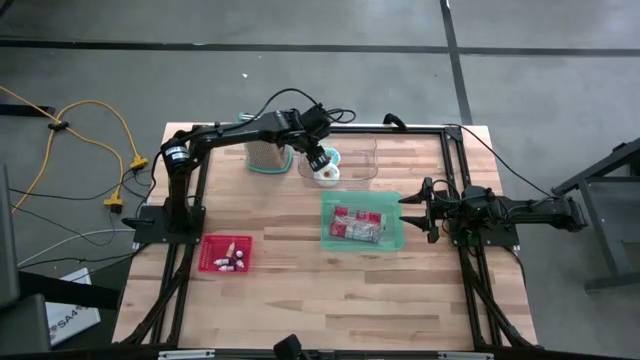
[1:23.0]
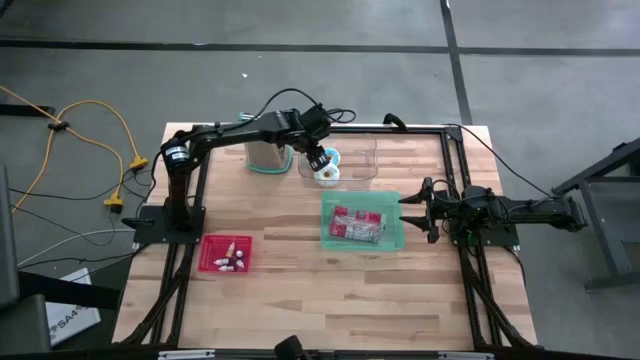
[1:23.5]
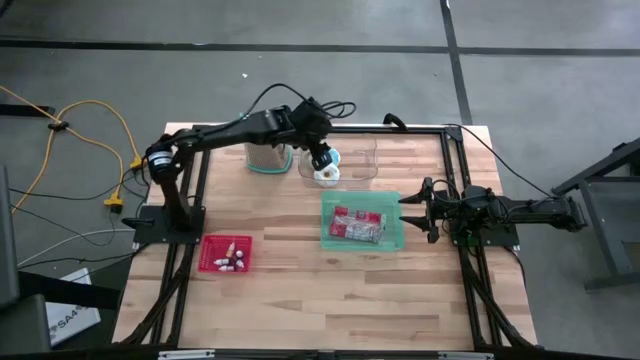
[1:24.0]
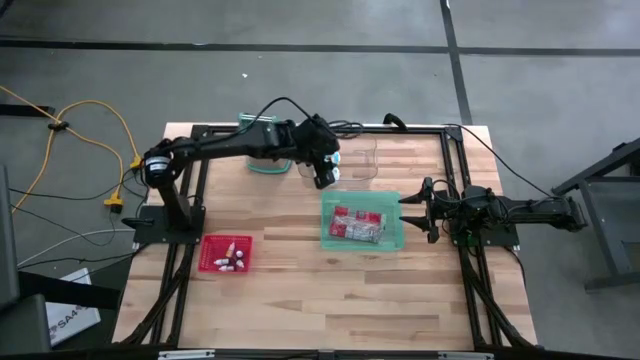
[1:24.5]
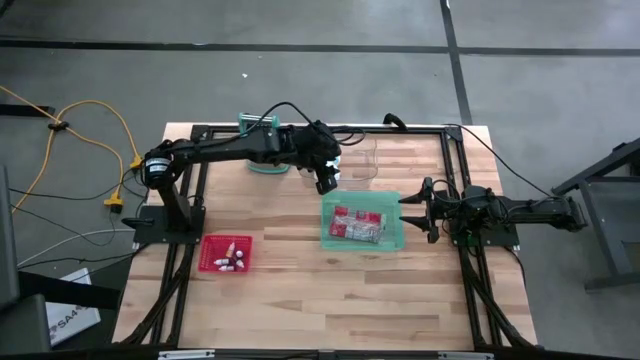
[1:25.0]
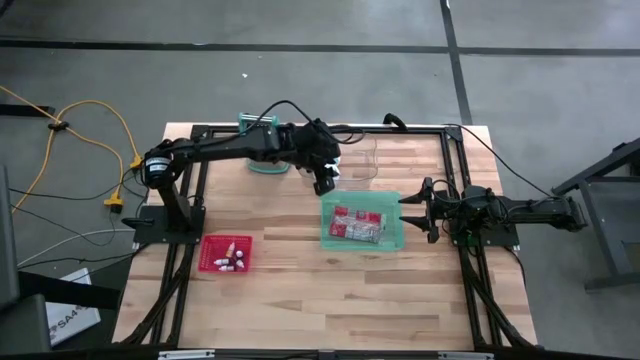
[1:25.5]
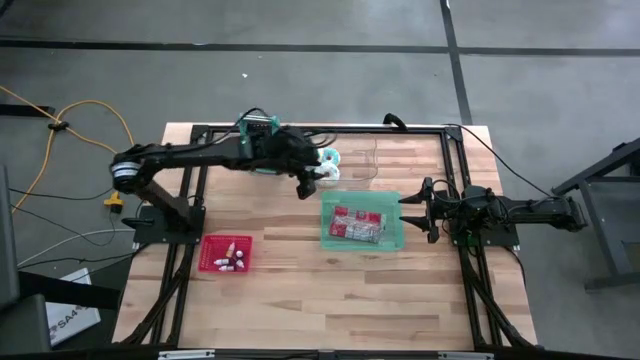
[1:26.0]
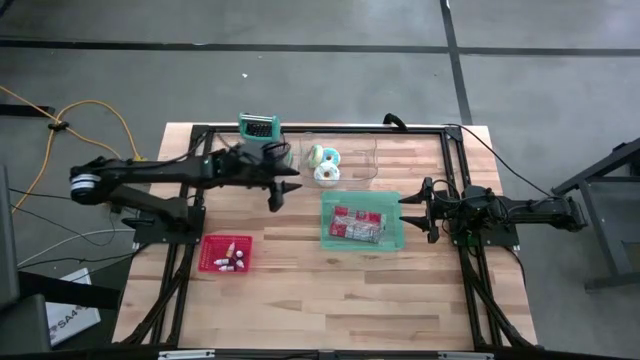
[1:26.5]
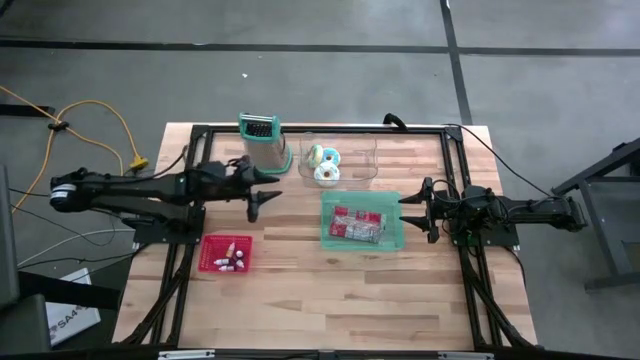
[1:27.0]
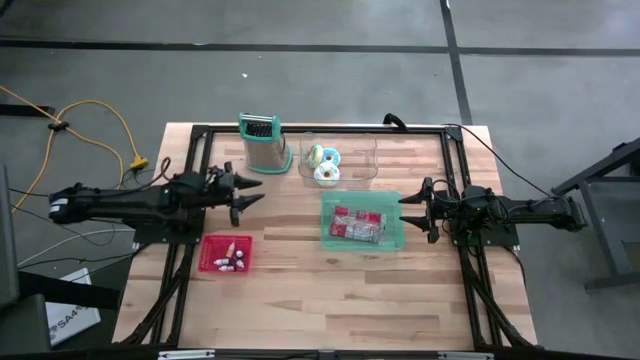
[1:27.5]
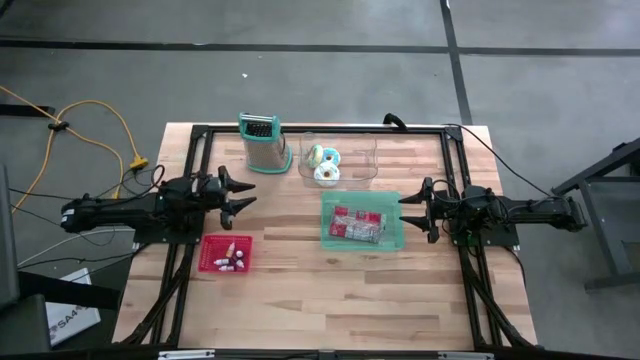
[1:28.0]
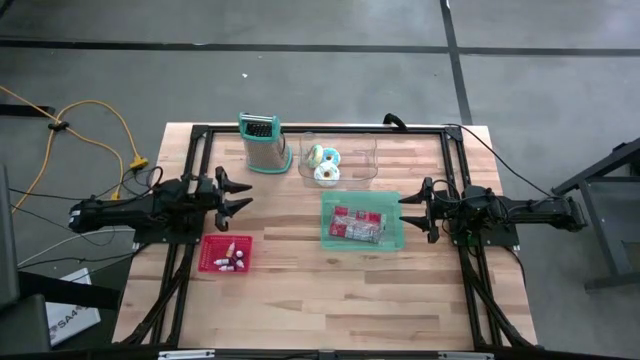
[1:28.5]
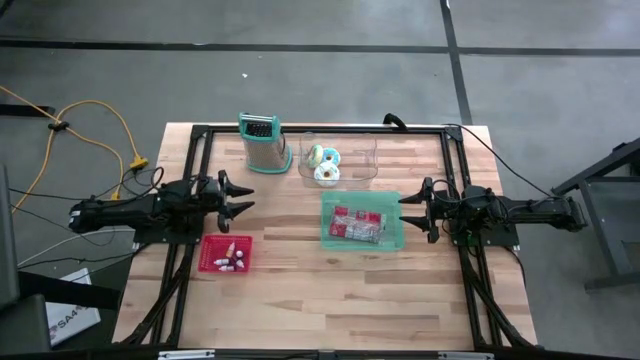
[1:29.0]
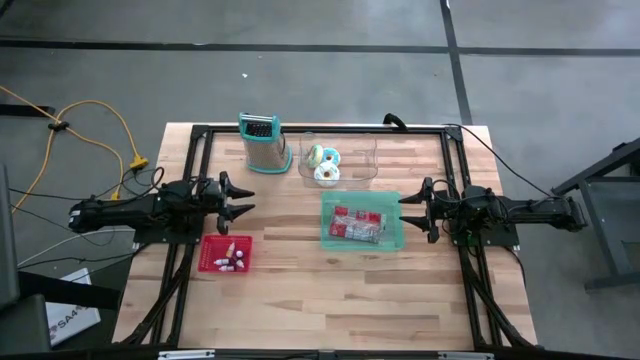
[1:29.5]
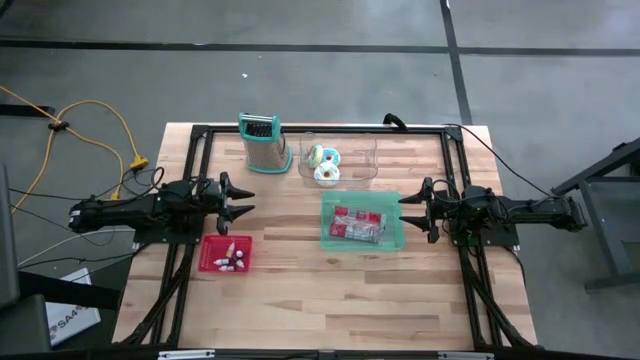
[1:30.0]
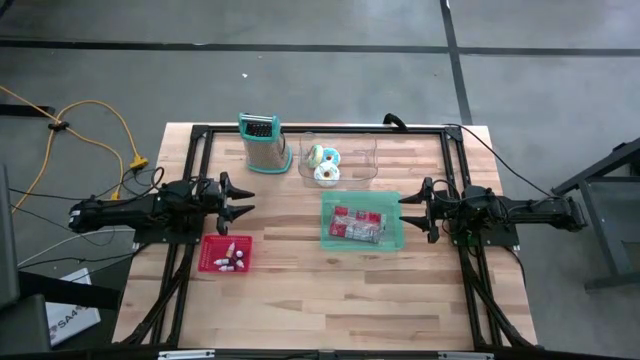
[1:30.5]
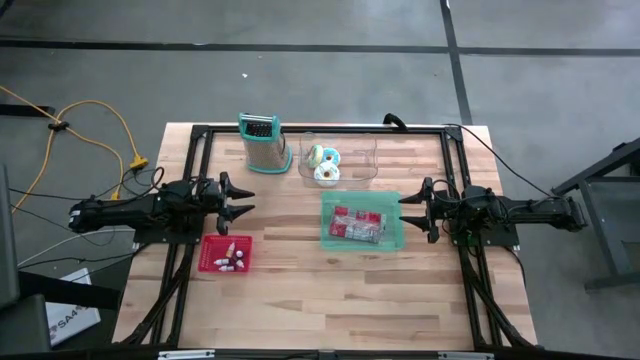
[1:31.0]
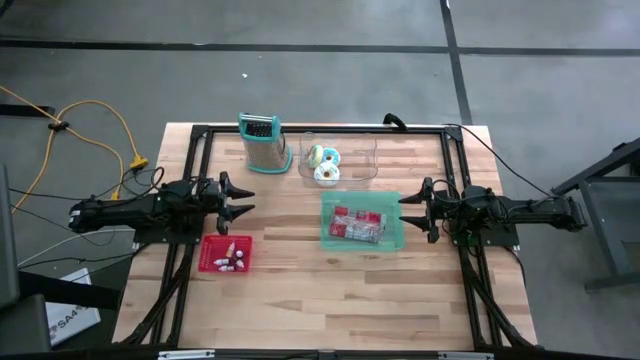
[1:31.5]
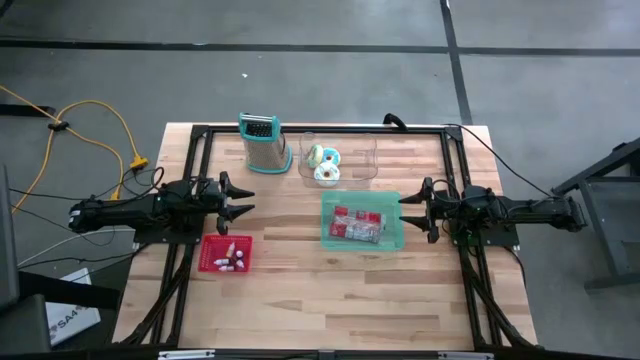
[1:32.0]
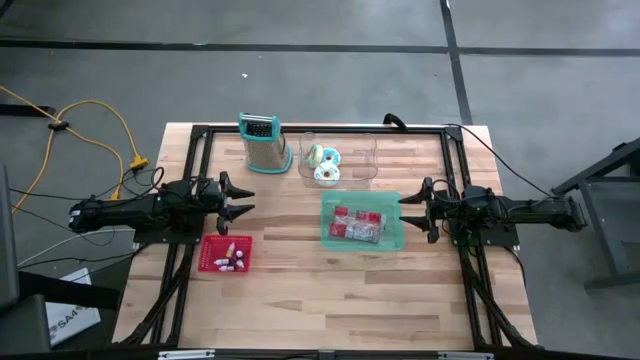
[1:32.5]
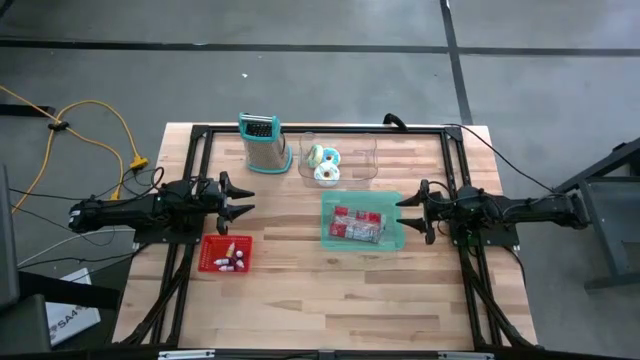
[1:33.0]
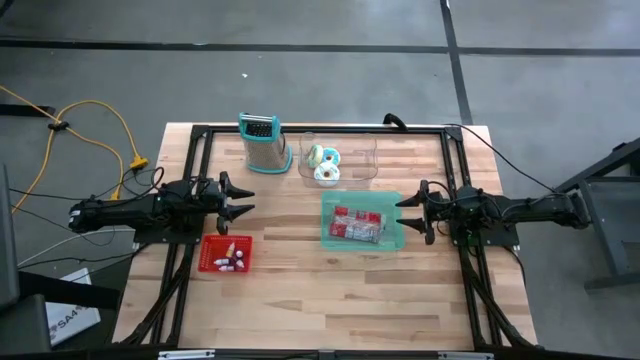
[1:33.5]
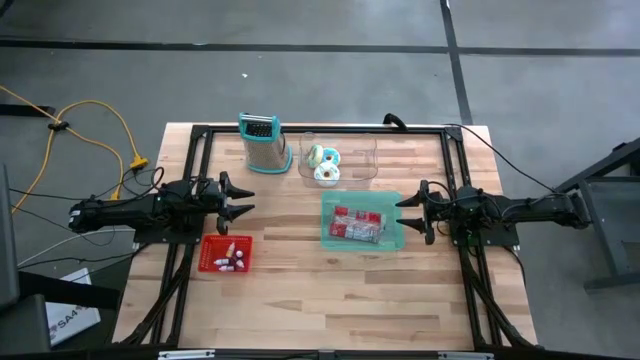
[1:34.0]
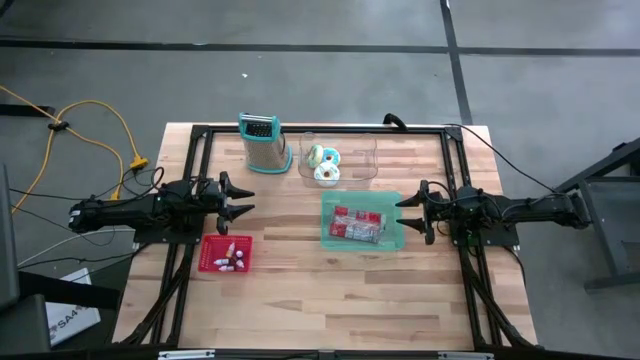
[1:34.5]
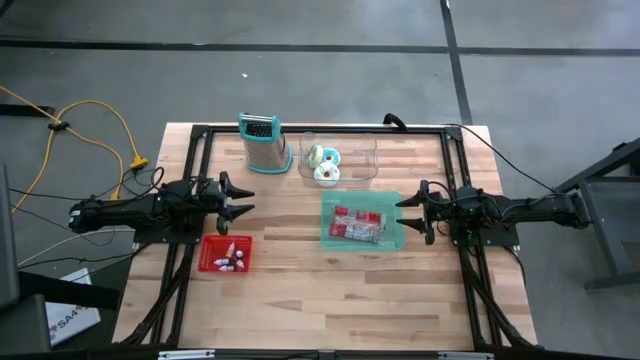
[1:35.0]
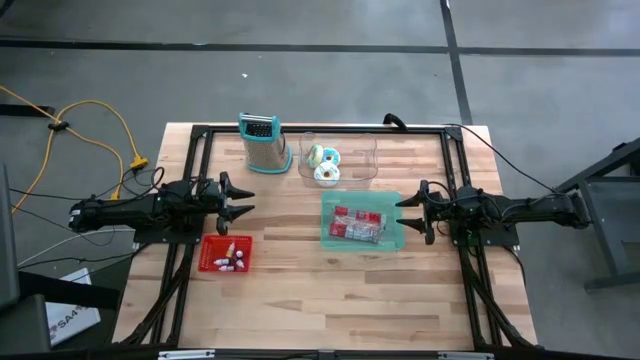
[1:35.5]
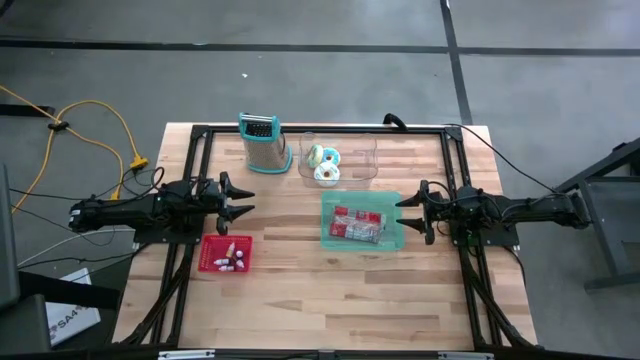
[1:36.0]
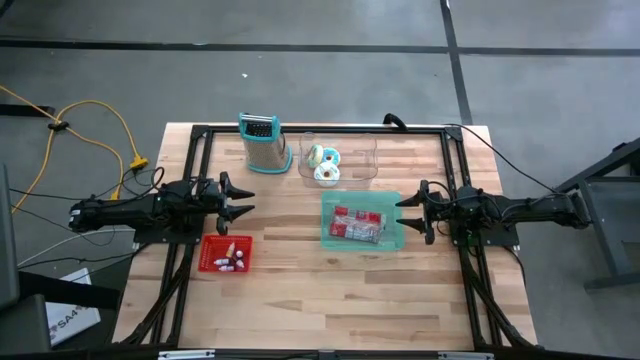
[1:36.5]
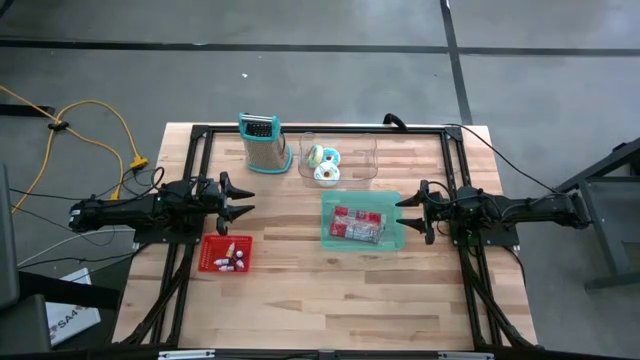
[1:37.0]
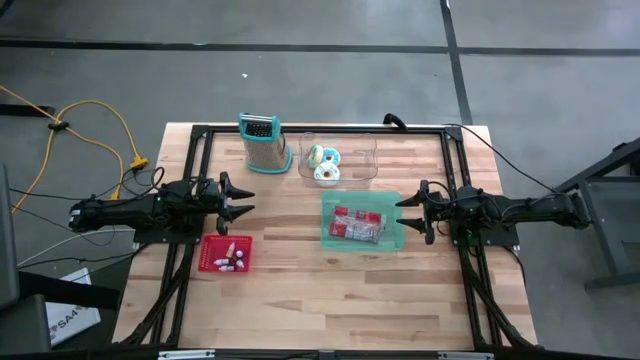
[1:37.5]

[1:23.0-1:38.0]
Return to Home Position
